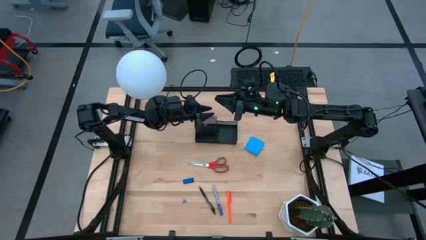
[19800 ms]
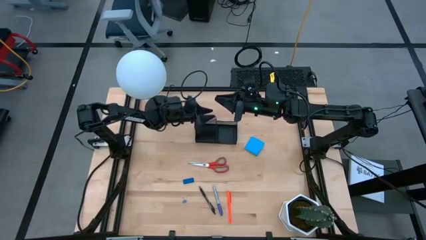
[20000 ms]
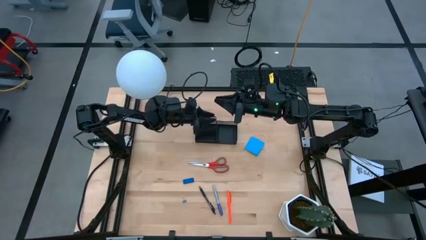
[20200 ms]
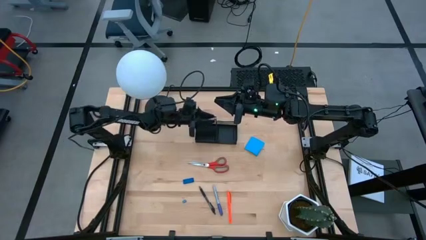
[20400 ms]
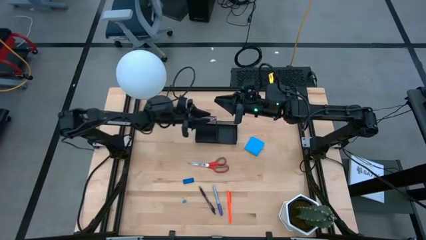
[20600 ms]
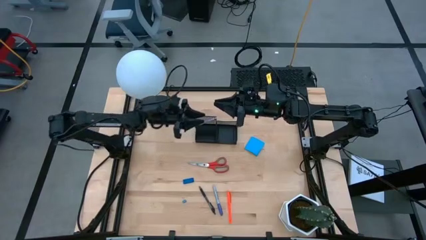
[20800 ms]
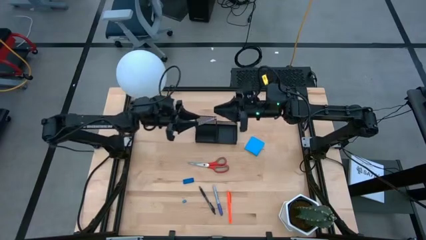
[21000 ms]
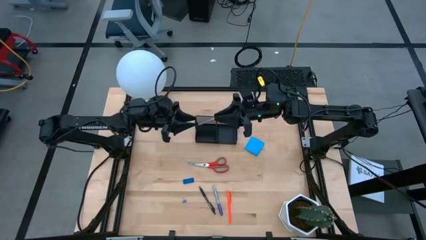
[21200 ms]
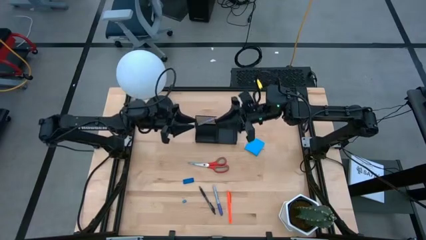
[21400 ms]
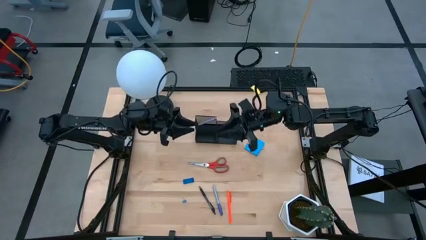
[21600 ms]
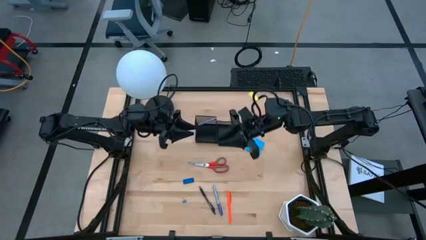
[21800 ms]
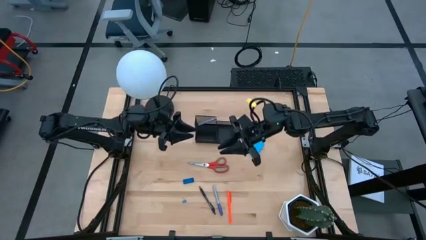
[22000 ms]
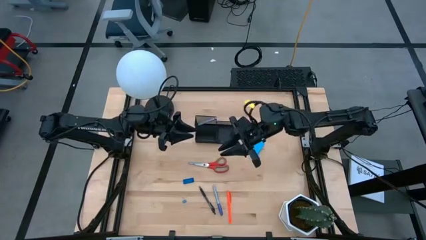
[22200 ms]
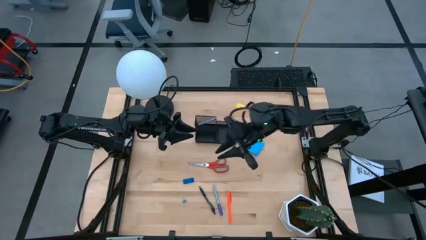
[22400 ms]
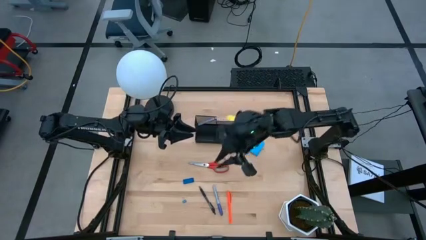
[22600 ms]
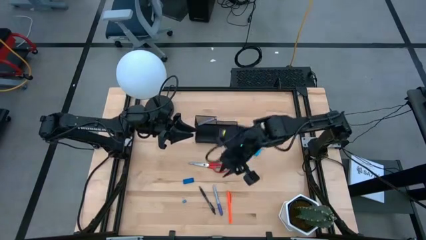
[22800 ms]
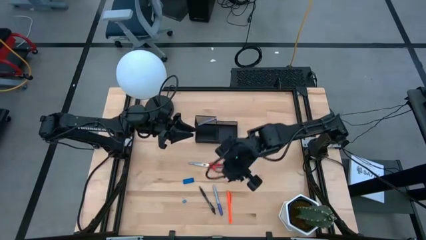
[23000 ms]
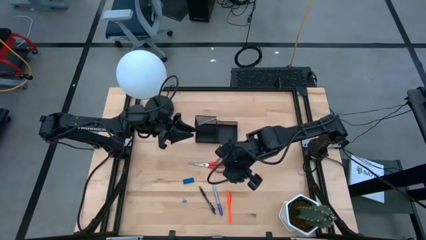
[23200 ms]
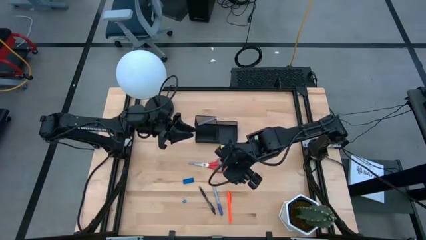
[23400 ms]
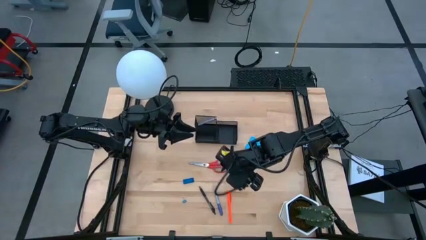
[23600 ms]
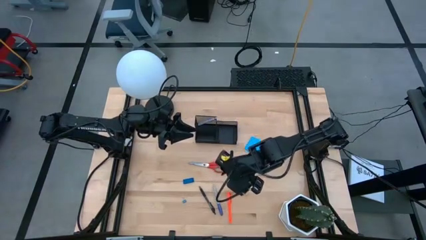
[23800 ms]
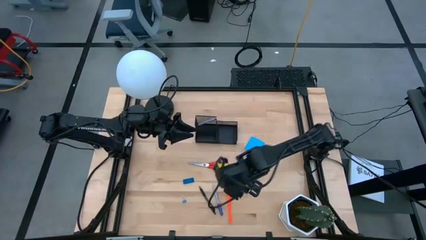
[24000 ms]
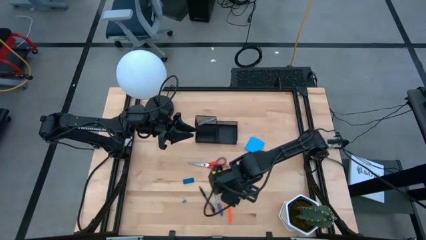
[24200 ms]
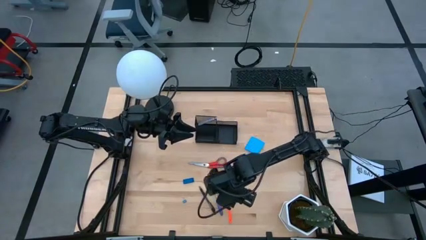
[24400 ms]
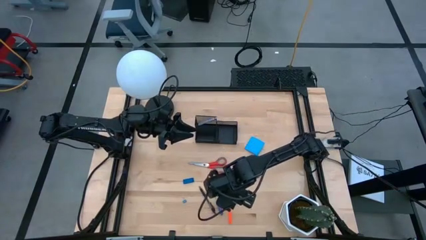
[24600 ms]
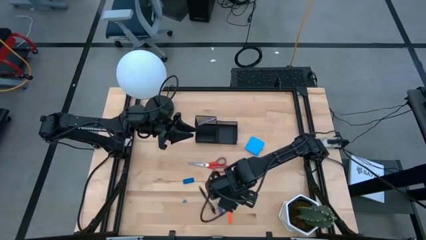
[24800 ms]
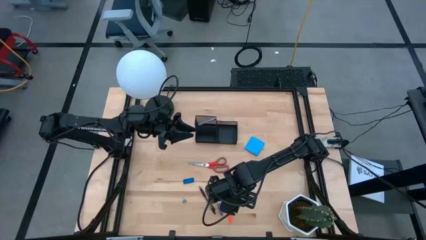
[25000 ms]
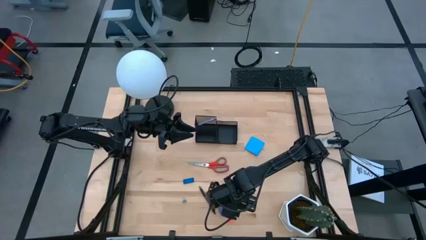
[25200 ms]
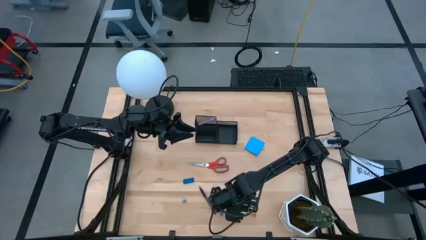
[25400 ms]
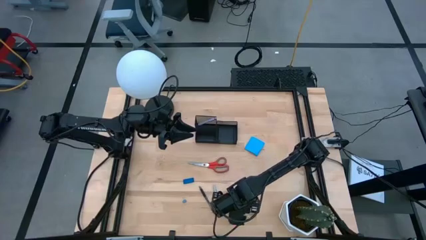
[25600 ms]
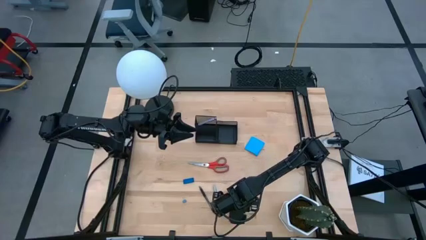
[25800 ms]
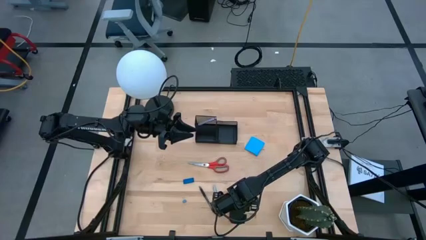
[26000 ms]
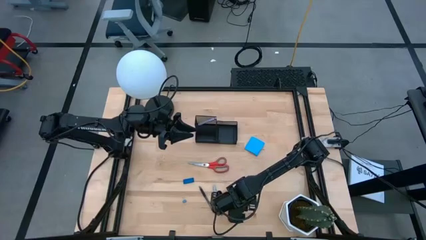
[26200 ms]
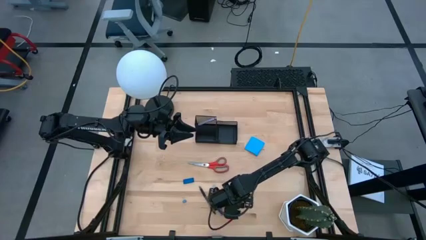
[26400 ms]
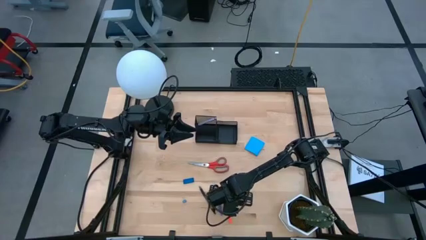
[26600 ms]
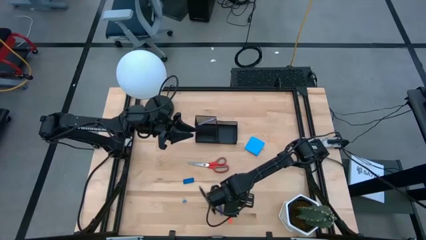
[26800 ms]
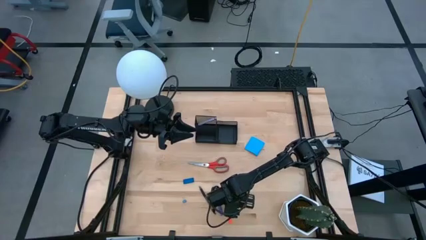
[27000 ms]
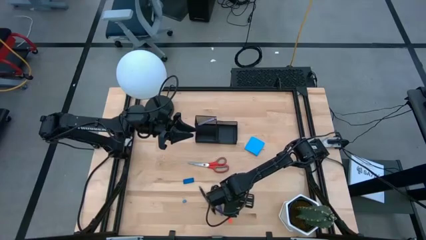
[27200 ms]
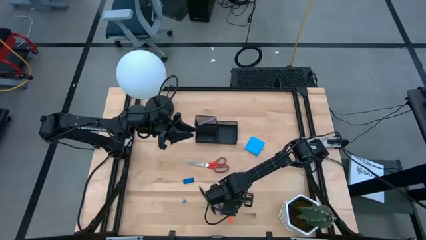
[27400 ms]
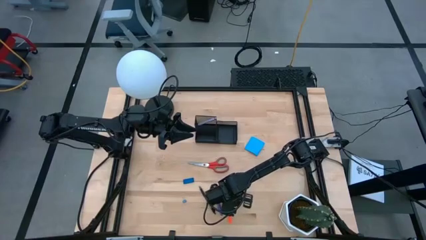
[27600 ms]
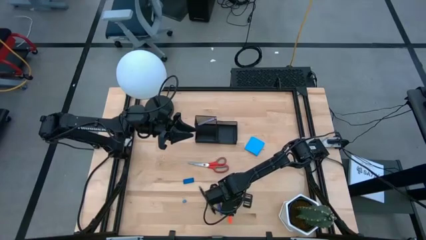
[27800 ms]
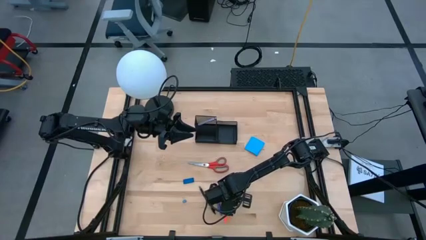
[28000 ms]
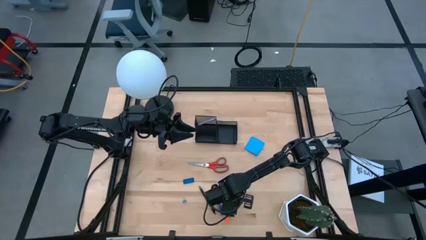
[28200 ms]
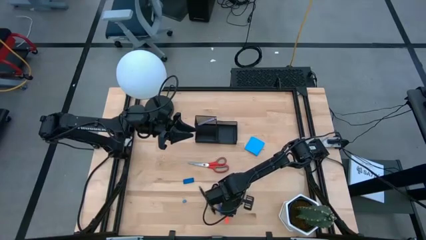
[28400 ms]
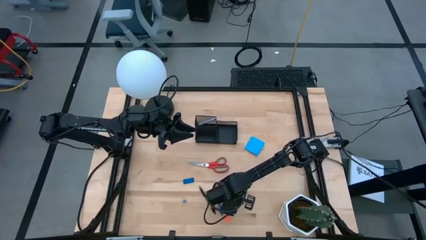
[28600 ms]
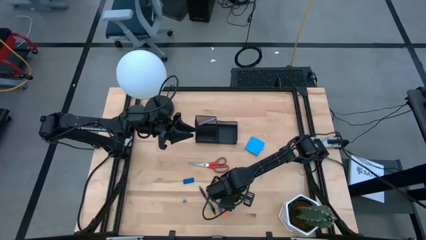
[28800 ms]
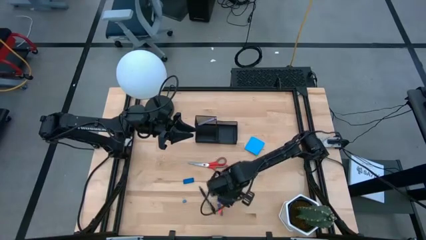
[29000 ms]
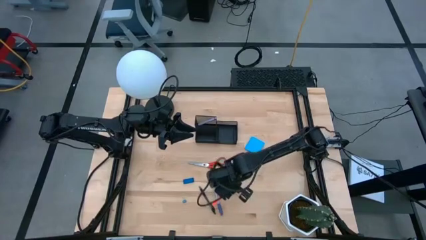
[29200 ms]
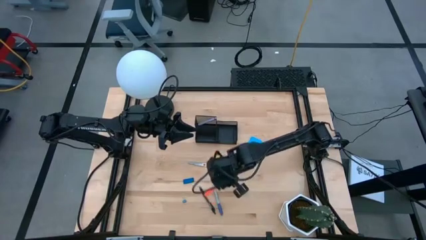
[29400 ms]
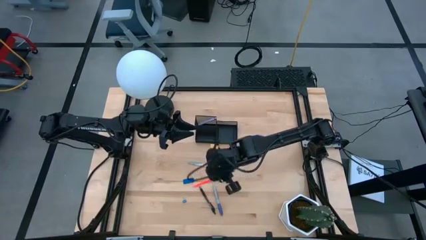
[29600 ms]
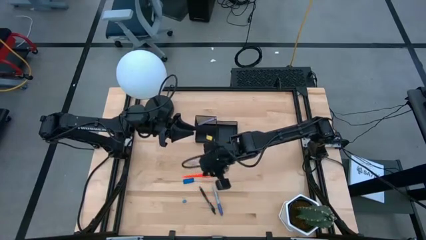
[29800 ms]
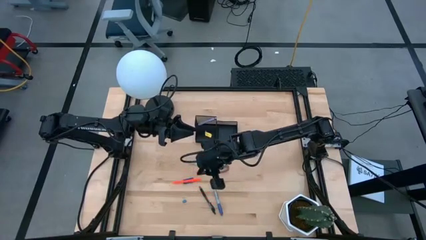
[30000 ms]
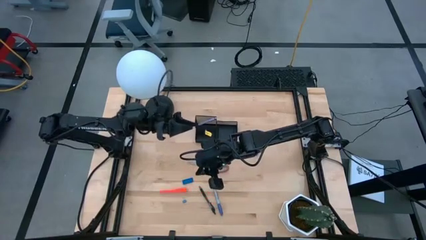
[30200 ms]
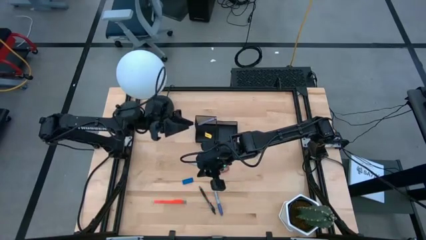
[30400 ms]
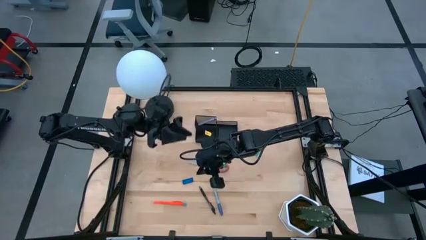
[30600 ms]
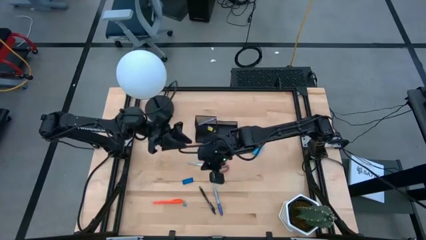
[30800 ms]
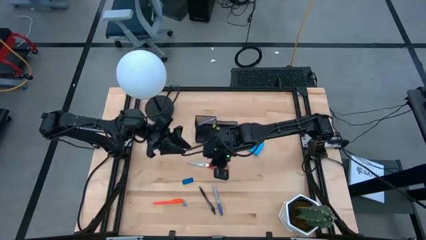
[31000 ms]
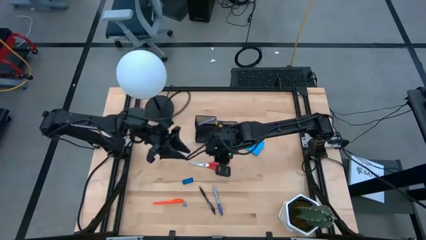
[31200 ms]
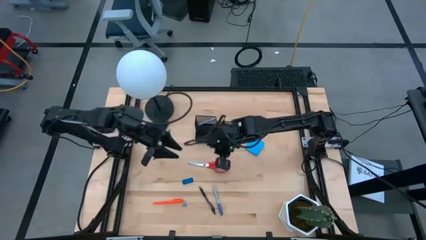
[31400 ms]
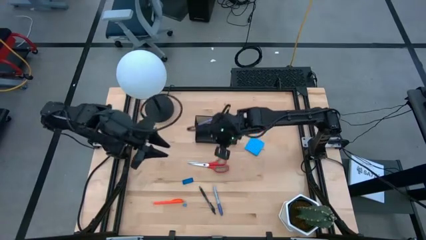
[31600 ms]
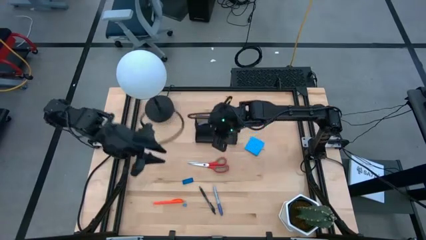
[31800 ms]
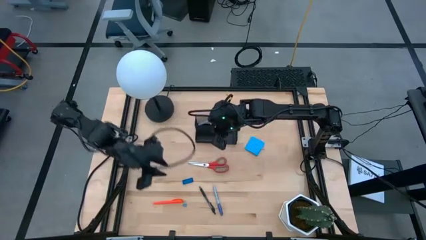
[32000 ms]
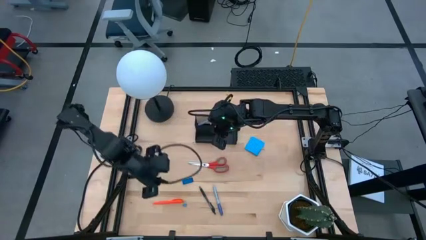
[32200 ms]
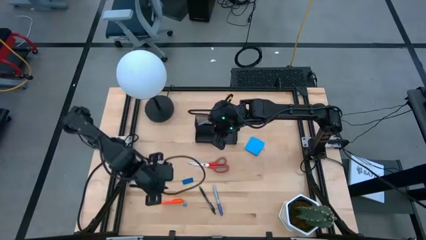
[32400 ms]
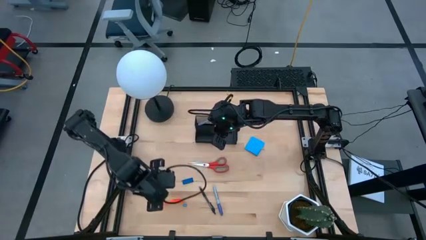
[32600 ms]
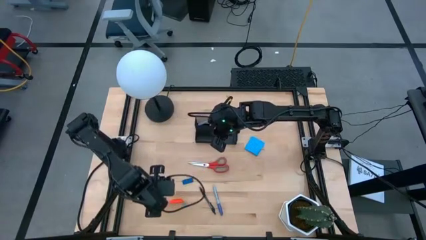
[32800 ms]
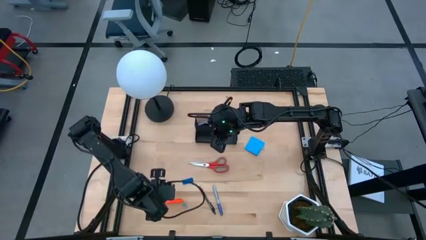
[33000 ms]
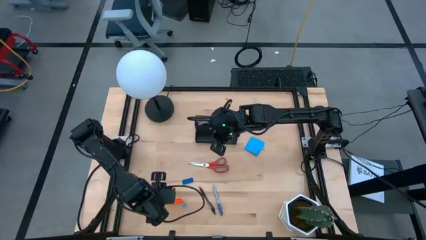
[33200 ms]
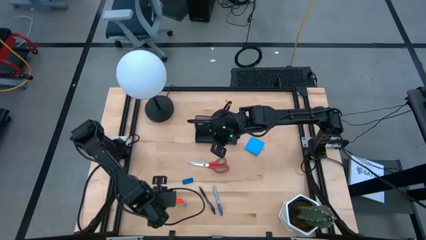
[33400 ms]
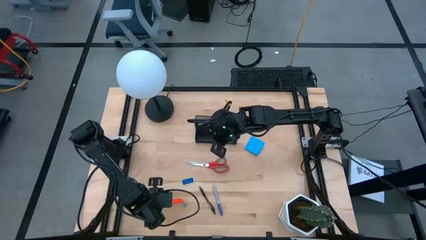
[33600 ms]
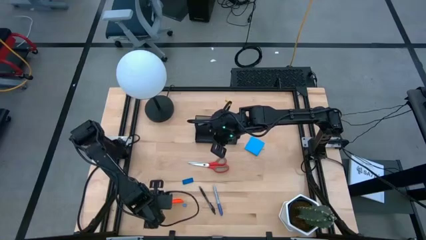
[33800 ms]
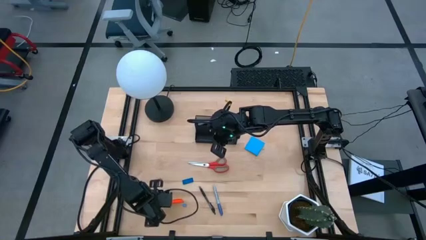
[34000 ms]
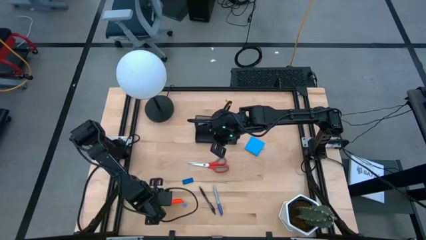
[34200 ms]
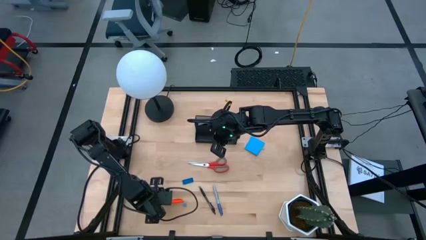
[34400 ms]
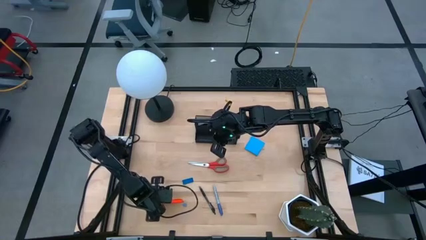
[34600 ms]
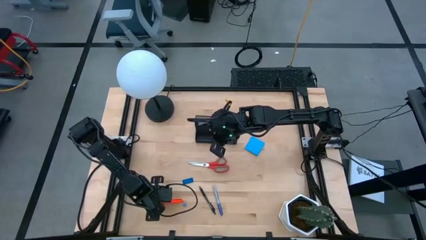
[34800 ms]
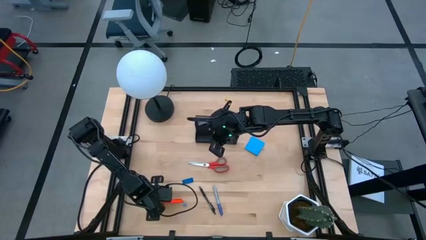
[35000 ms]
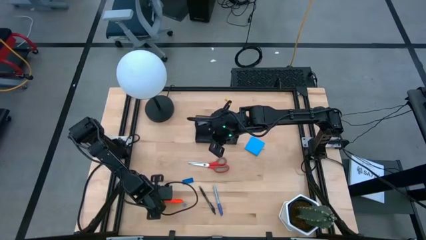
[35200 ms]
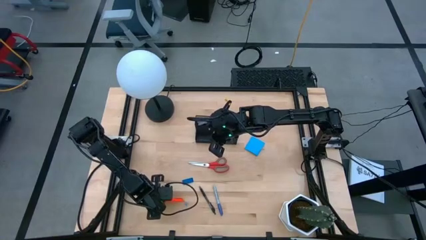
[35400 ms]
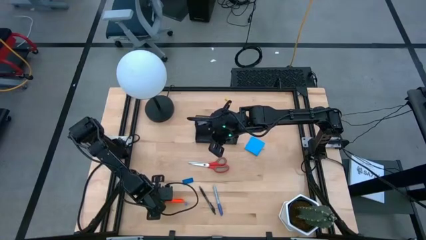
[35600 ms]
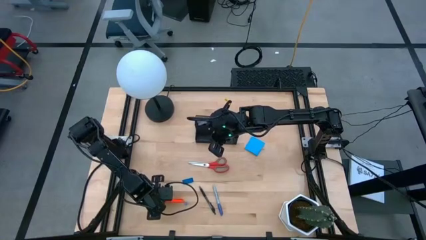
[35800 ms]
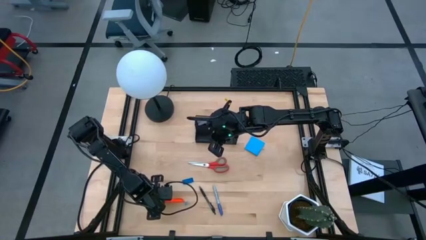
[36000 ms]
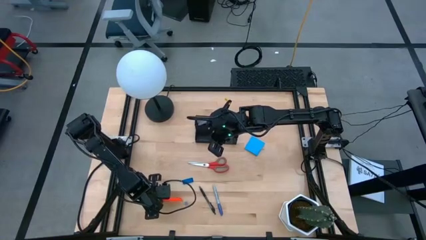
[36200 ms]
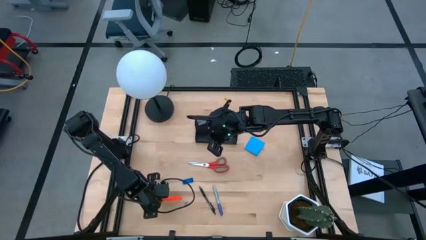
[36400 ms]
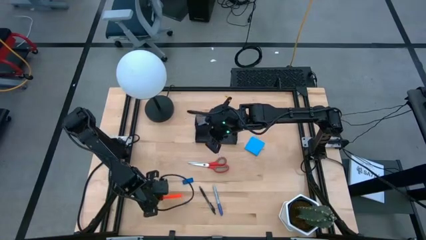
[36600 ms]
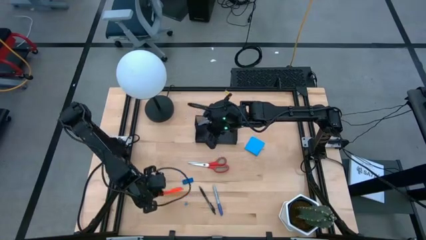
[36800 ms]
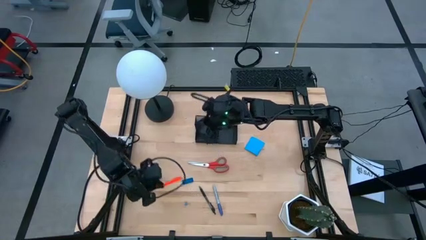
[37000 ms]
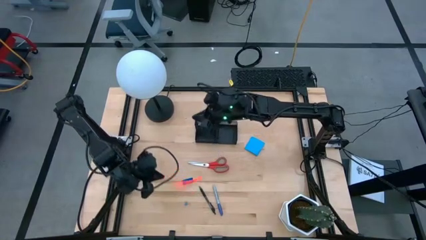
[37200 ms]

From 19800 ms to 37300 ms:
Task: Pick and place office supplies into organizer
Put the orange pen into the black desk organizer
